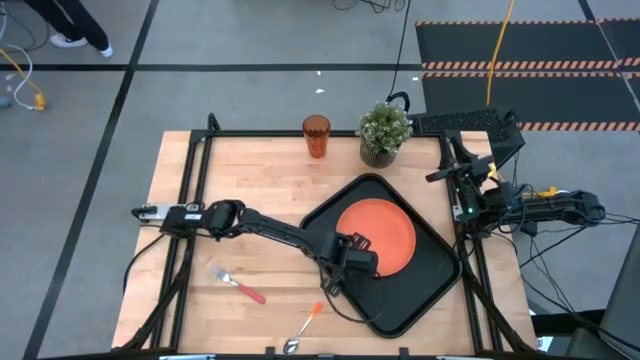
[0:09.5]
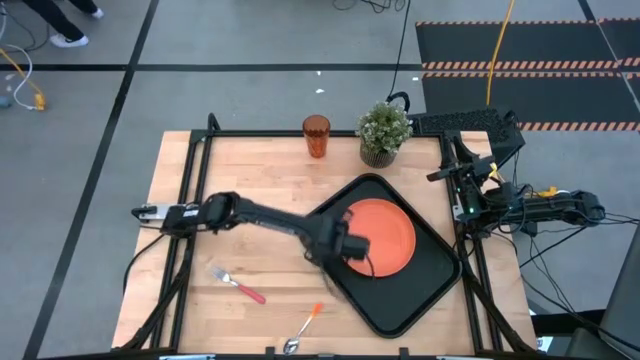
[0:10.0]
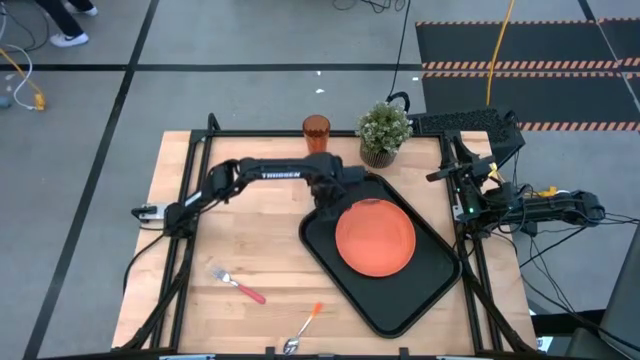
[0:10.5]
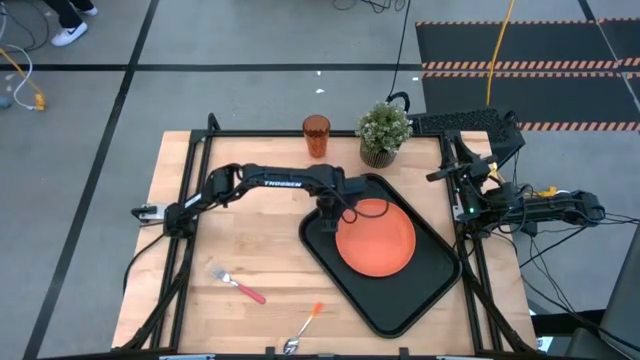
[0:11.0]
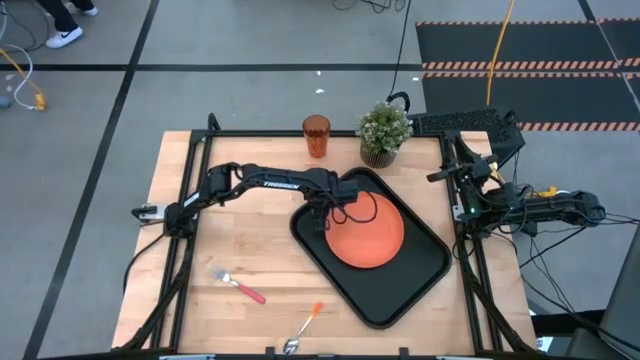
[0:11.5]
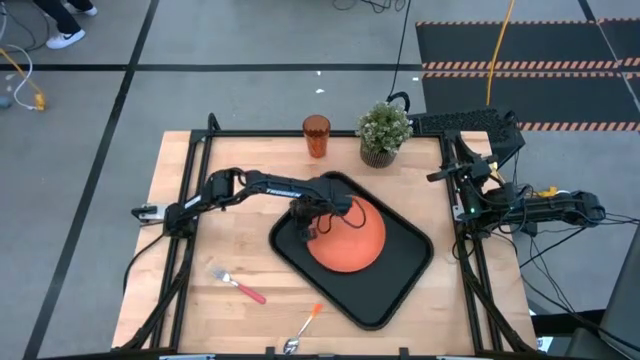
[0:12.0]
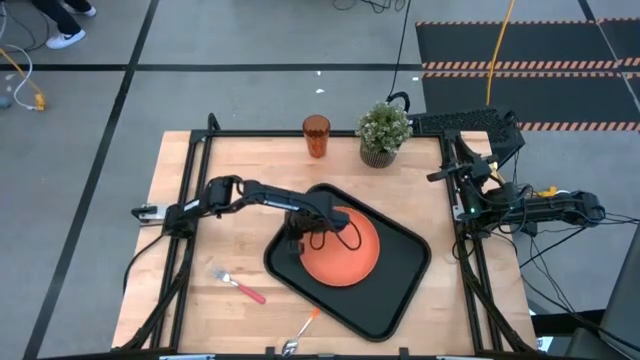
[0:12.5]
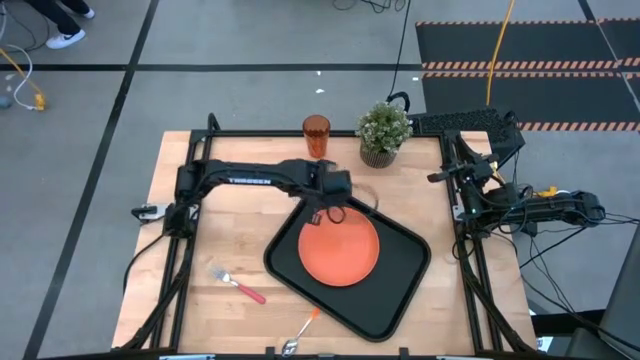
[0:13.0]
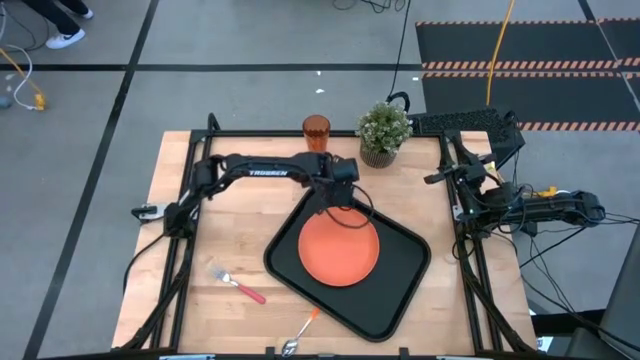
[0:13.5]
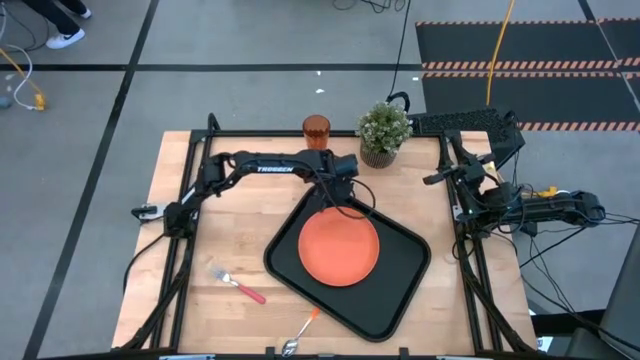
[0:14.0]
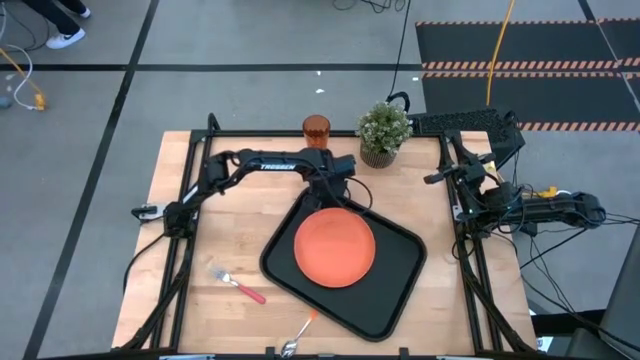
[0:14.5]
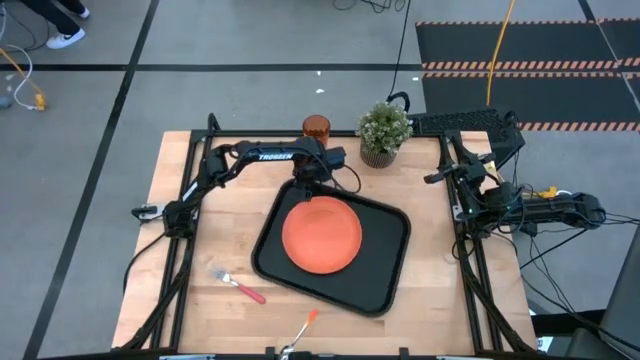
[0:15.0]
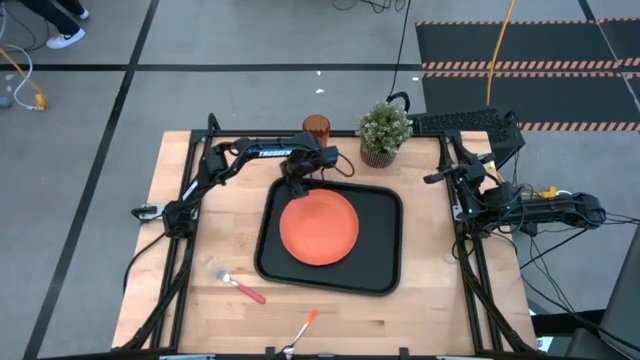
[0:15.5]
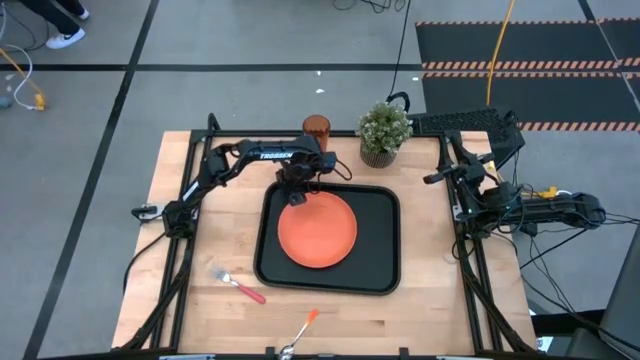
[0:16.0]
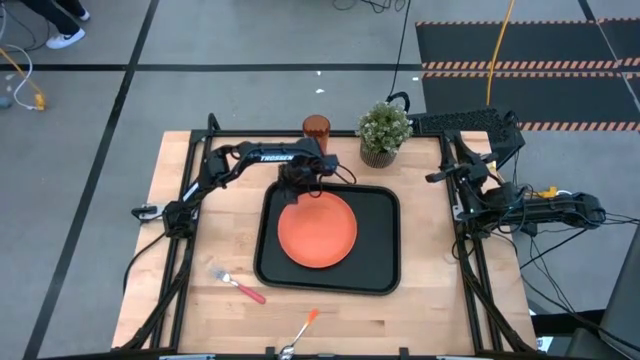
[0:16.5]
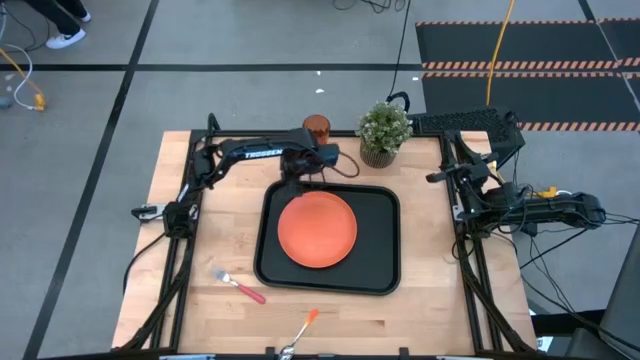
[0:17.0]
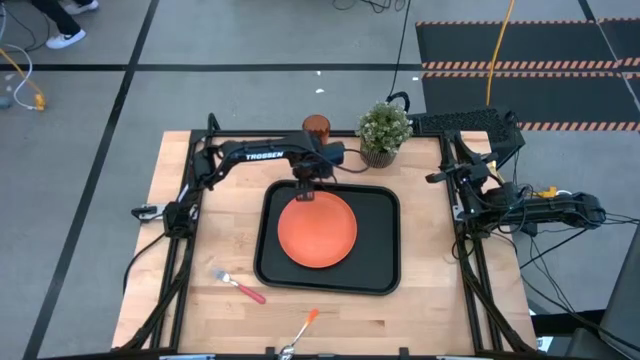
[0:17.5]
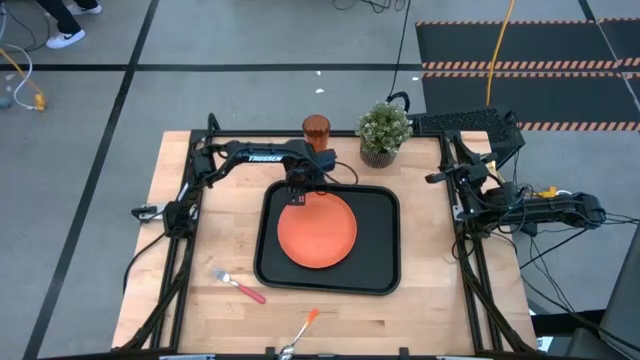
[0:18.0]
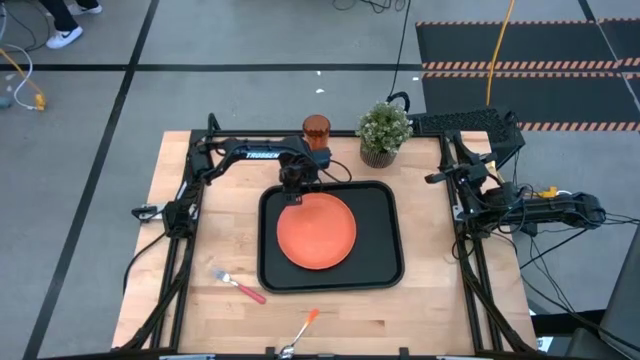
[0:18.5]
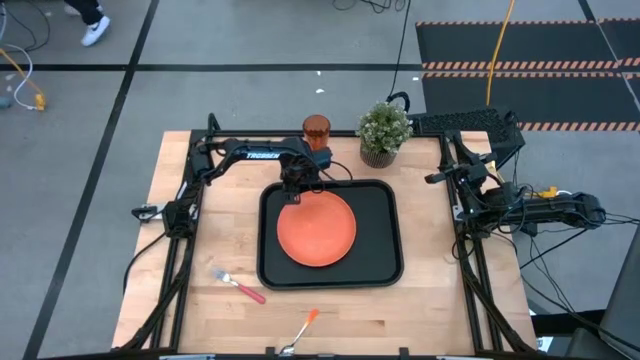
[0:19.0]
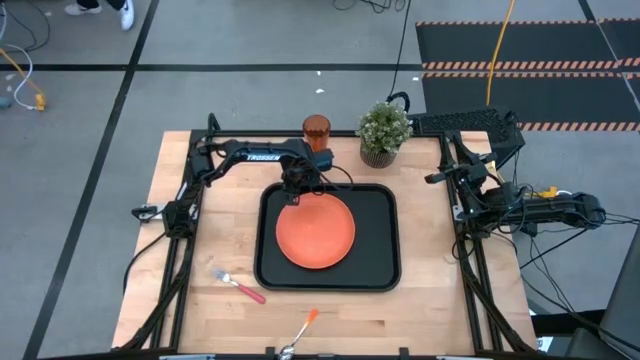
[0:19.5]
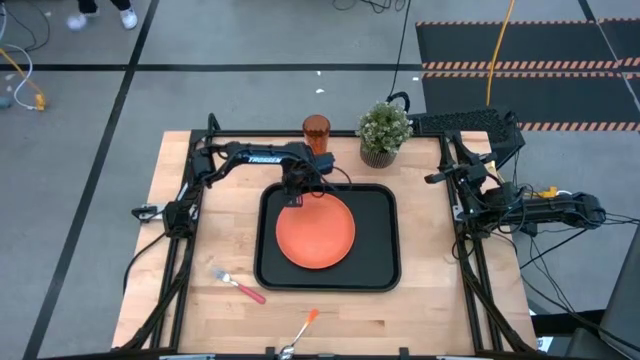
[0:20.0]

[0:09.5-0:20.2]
Task: Pick and place plate/cup/fork/spoon on tray
Move the black serving tray to the center of the table

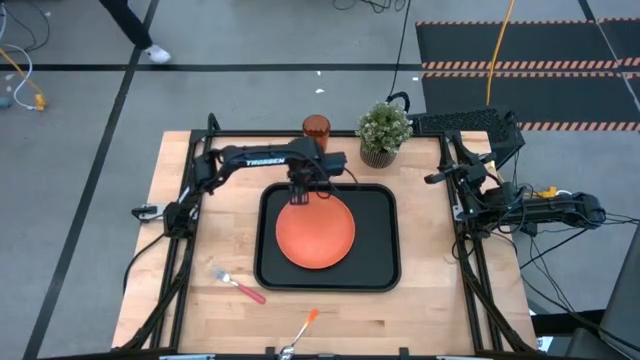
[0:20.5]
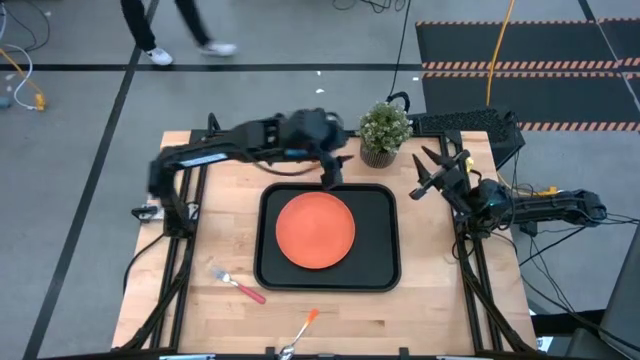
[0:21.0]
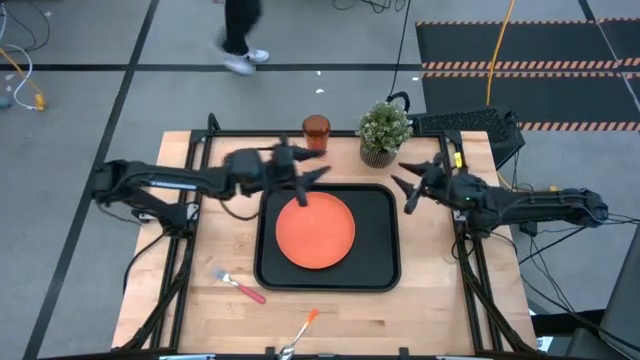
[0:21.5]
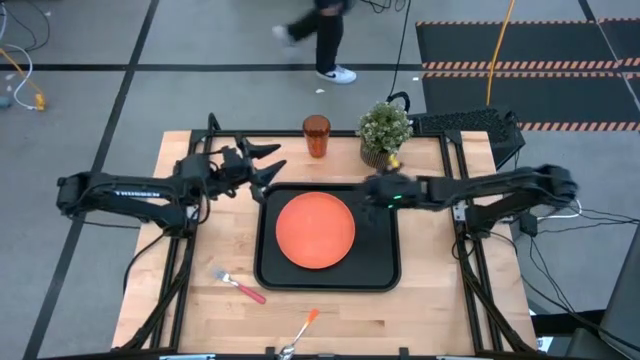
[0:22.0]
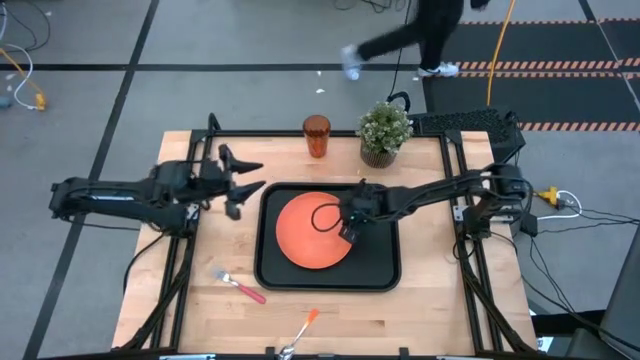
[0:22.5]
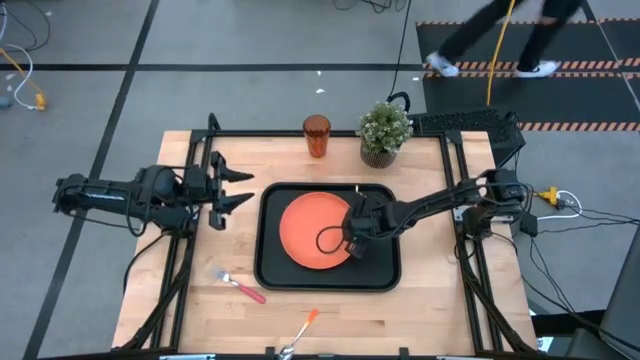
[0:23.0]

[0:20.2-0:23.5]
Adjust the orange plate on the black serving tray

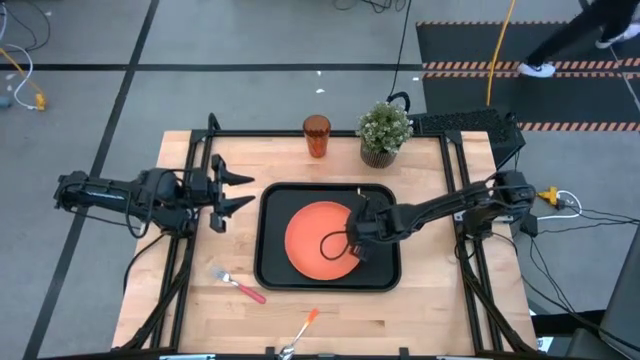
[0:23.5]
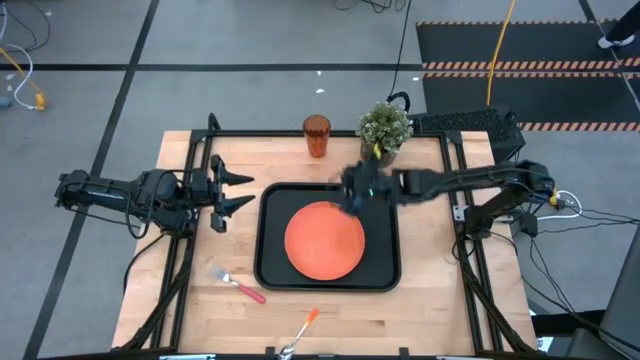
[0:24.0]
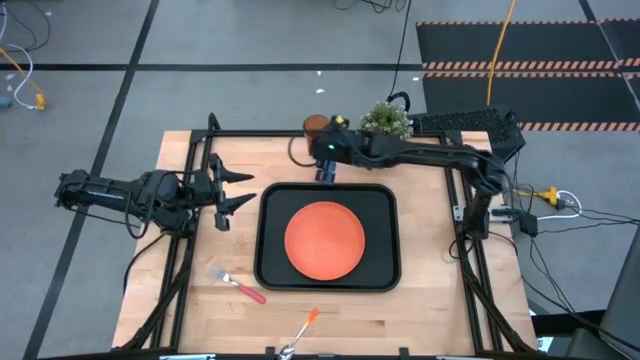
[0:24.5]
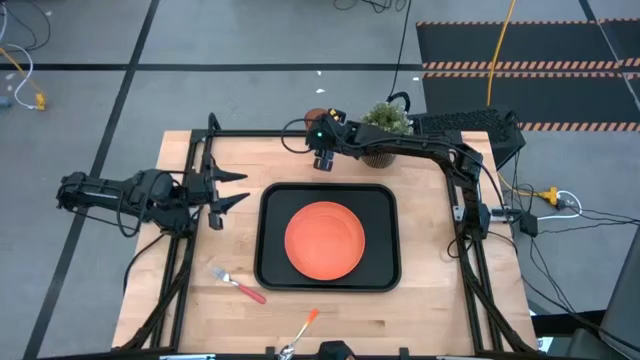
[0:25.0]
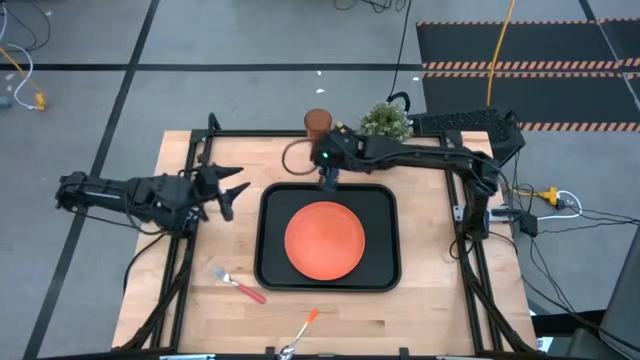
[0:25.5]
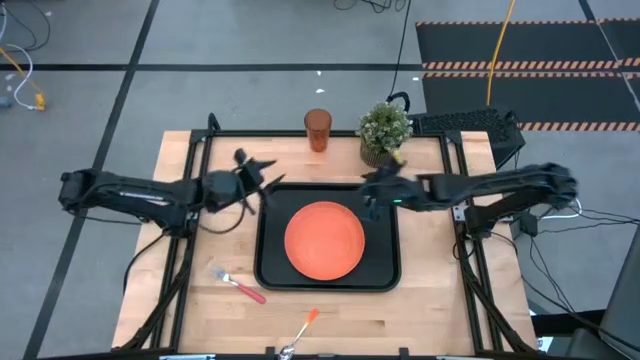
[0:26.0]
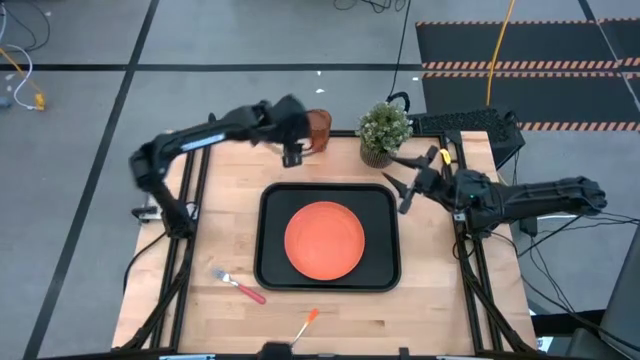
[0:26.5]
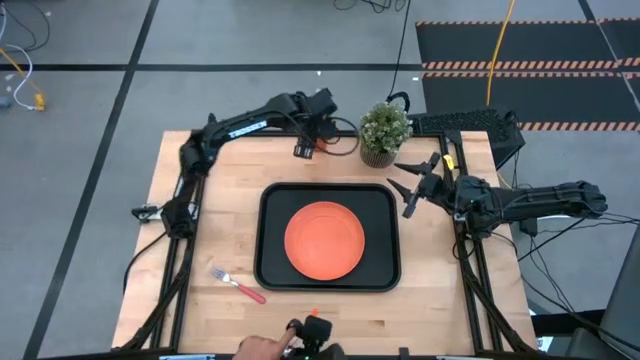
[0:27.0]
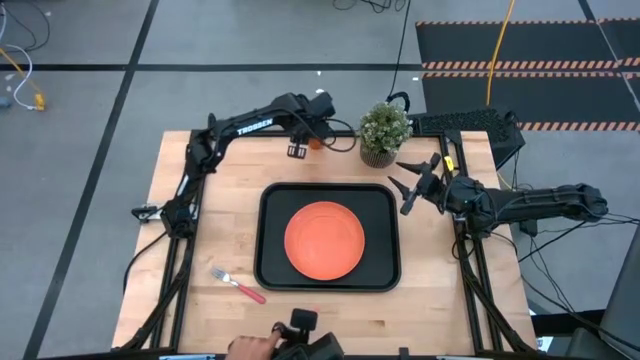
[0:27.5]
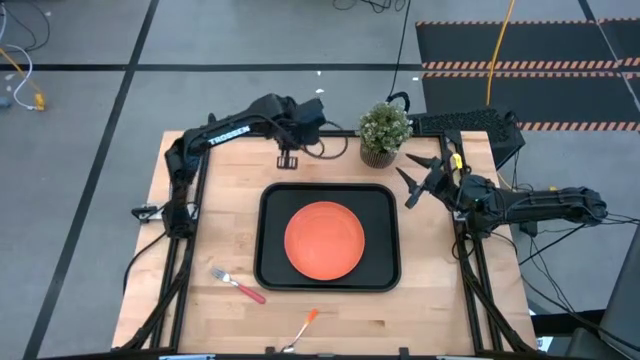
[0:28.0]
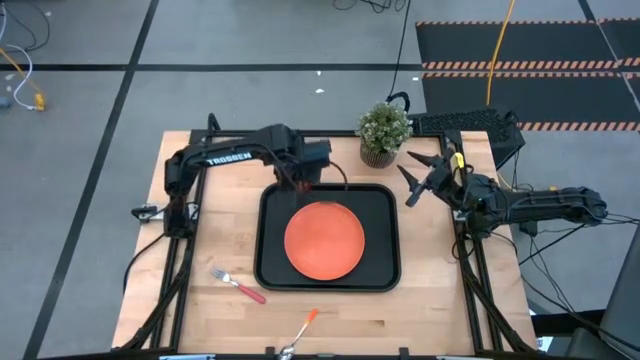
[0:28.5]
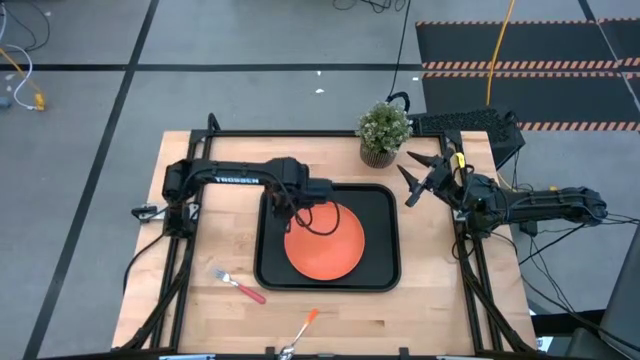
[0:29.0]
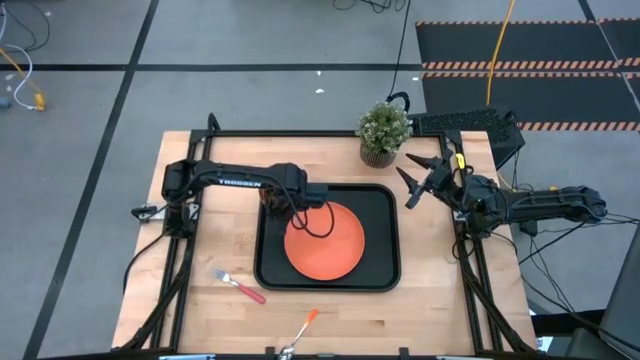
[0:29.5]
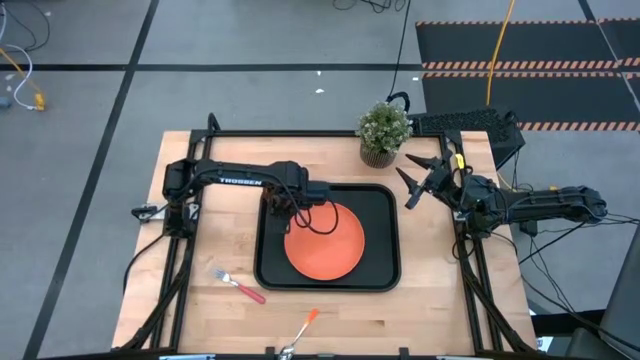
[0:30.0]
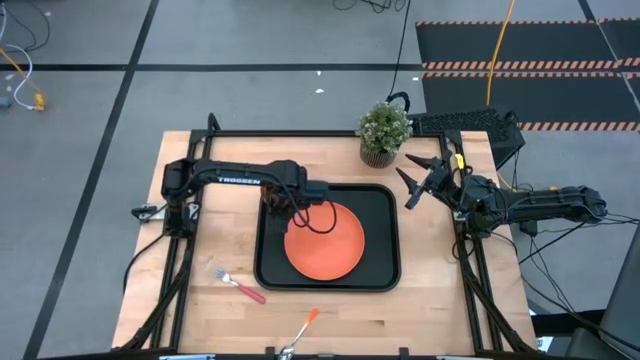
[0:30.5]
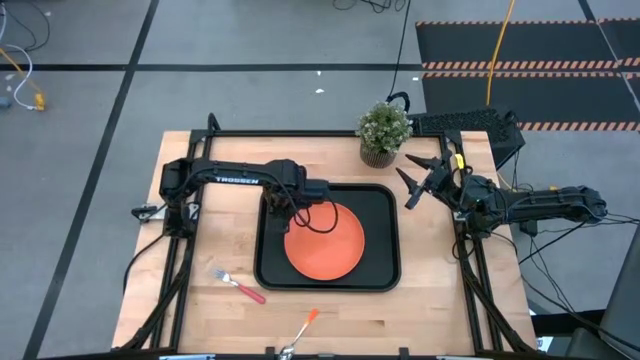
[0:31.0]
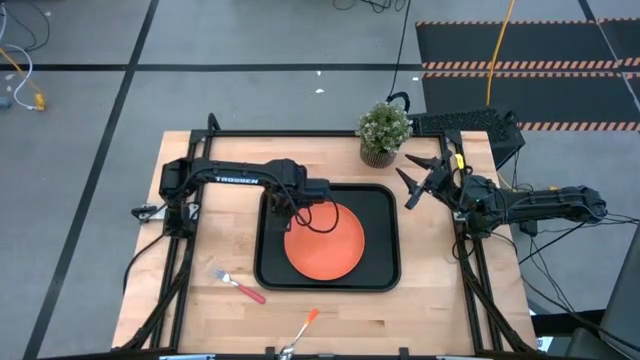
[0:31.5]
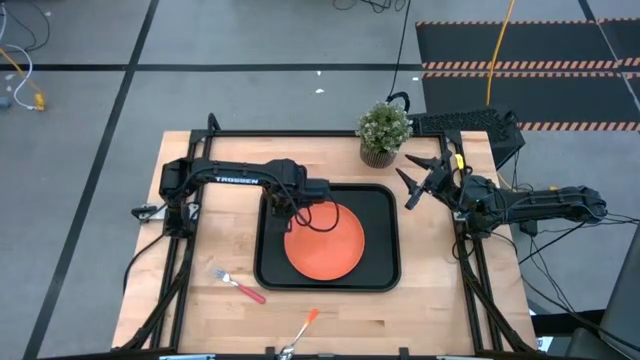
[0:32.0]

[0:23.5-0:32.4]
Put the orange cup on the black serving tray
